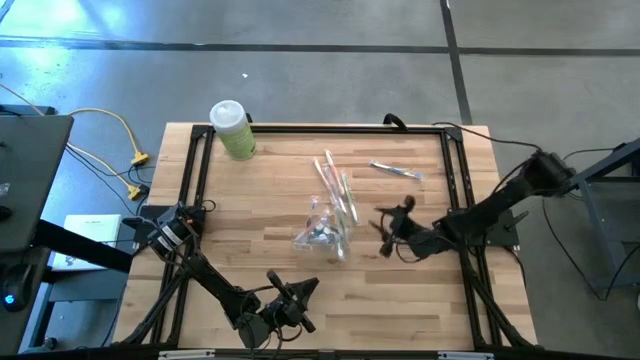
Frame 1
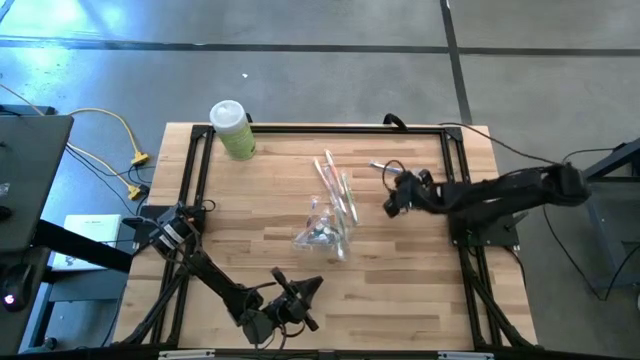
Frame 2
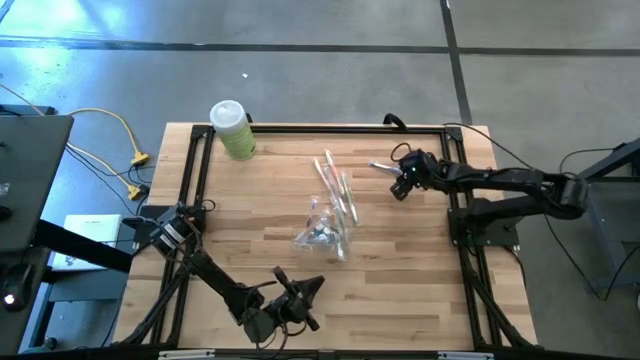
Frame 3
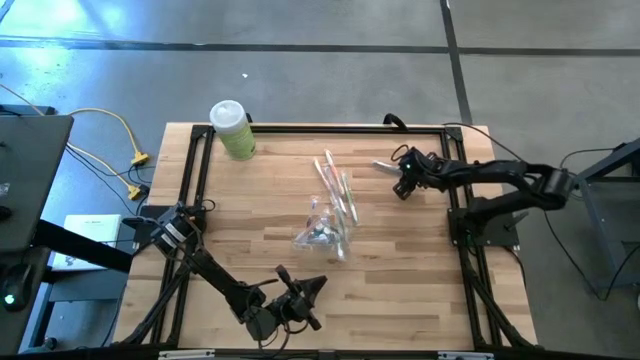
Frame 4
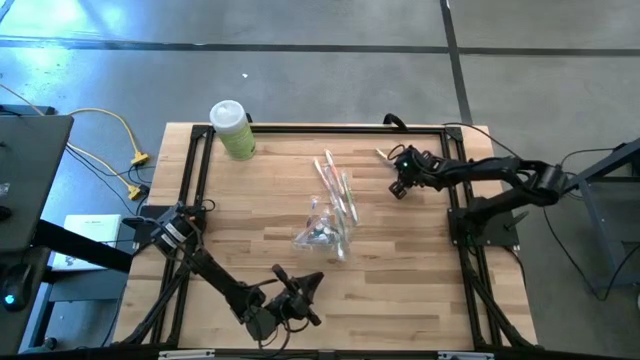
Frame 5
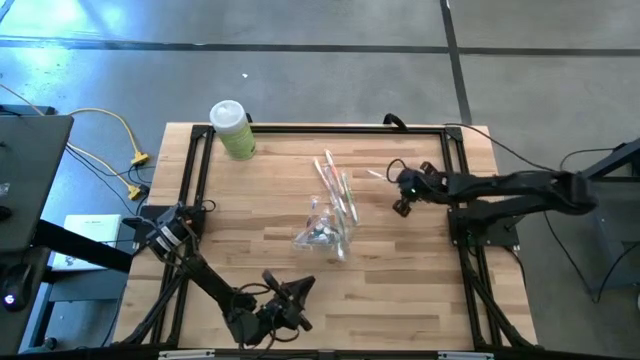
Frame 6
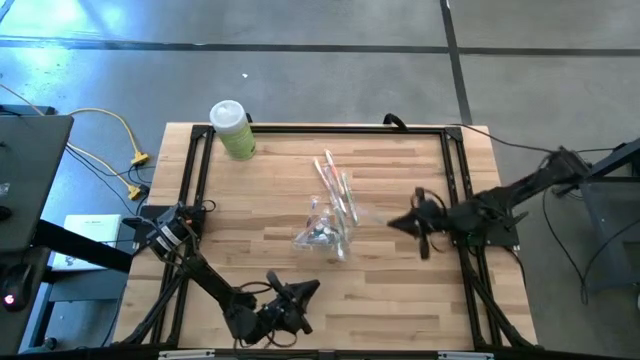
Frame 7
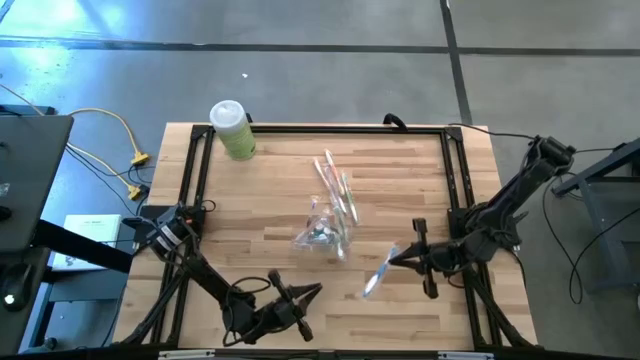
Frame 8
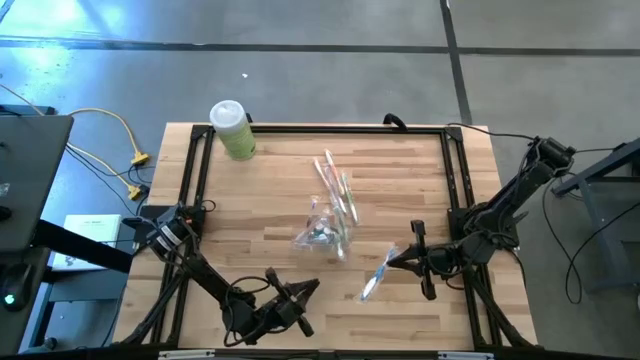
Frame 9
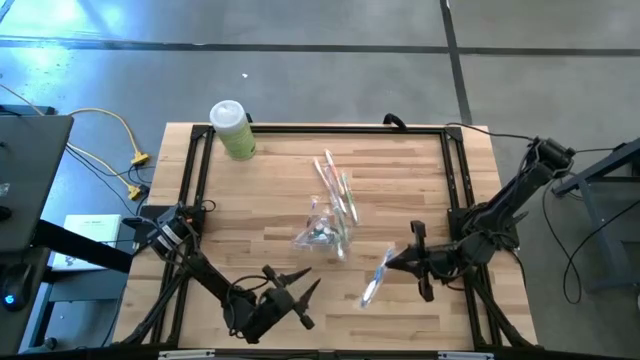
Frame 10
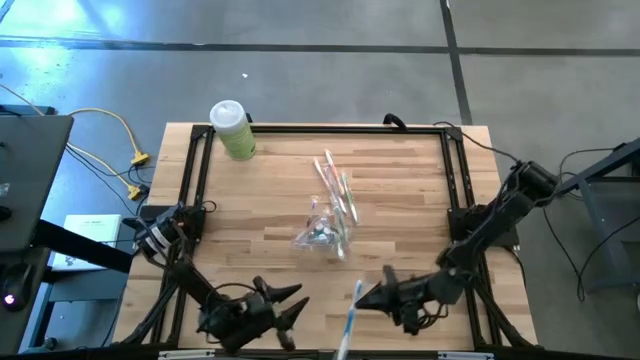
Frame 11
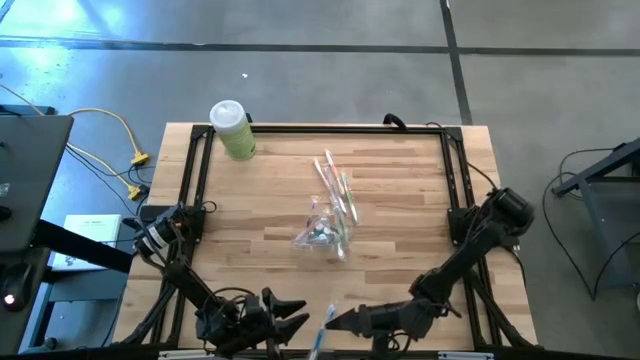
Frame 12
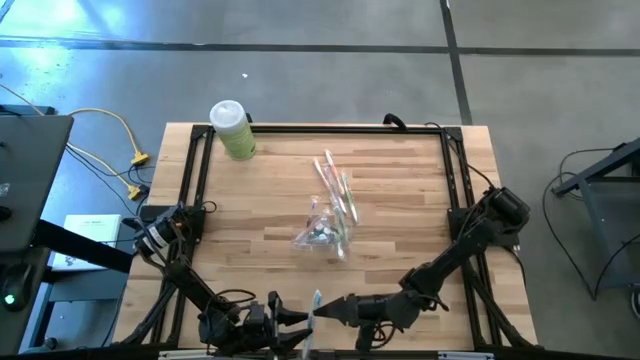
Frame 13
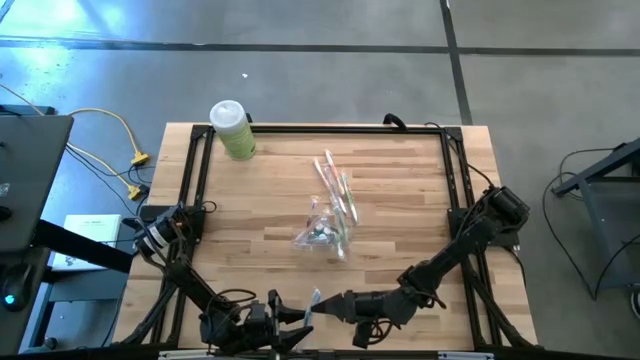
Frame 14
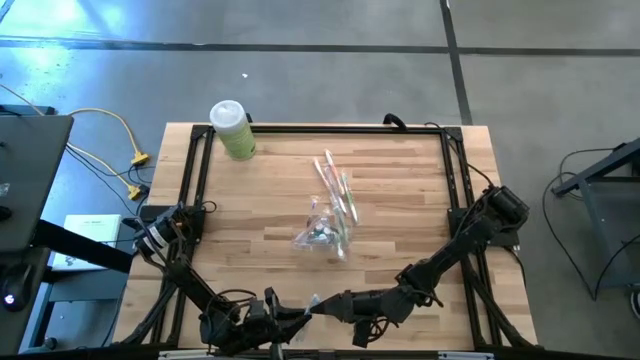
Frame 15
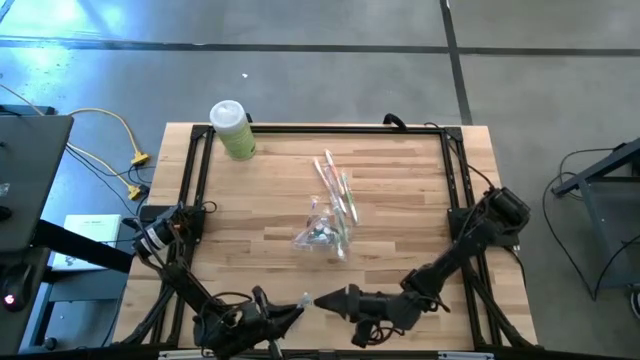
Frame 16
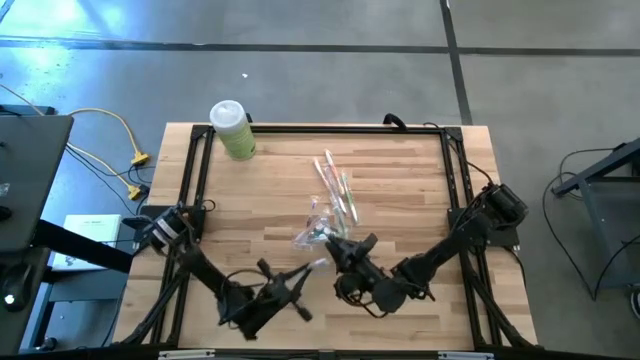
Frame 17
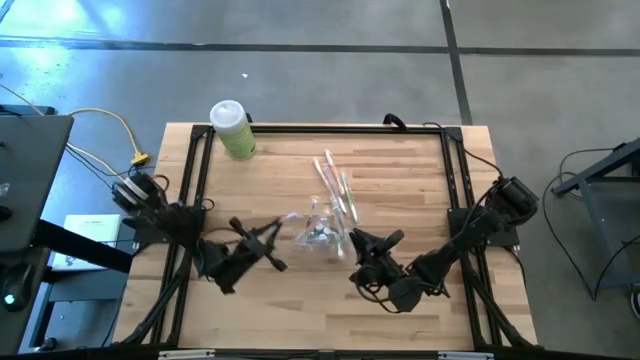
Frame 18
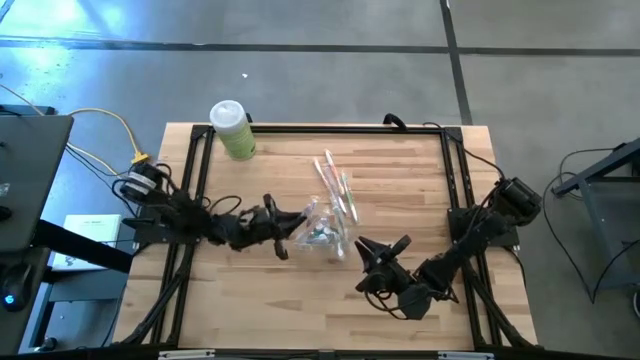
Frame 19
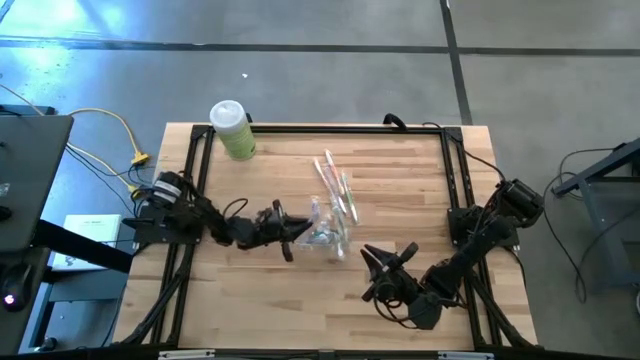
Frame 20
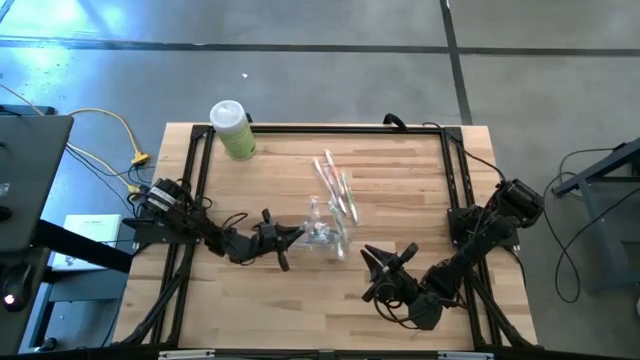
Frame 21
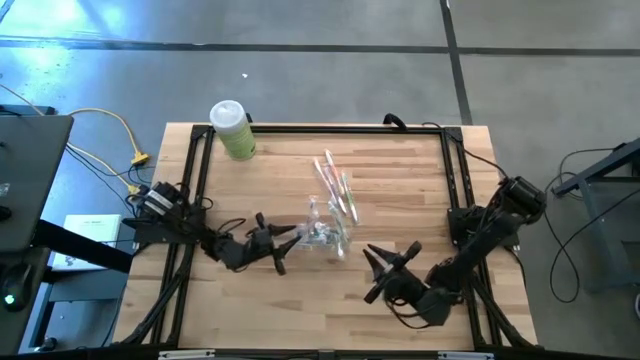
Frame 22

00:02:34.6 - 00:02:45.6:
Task: Pick & Place toothbrushing station
Put the blue toothbrush into the transparent organizer

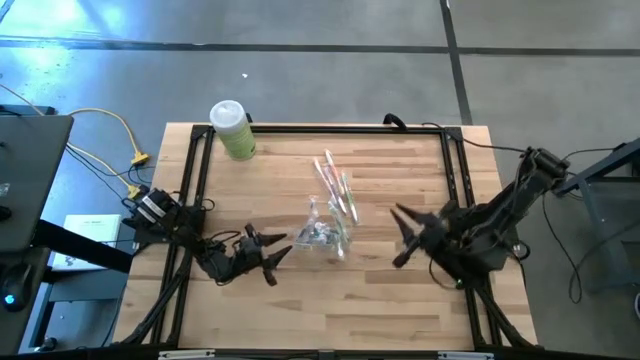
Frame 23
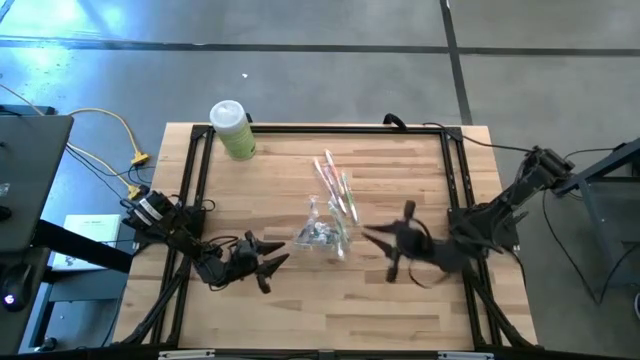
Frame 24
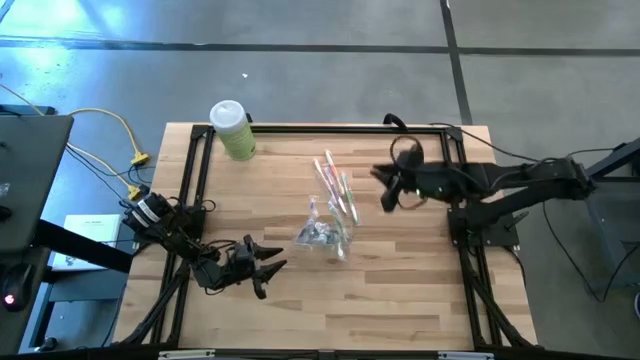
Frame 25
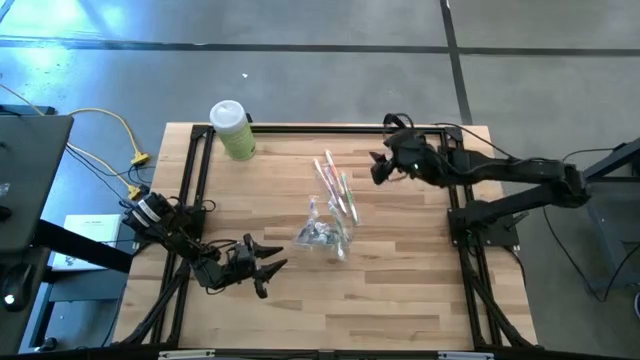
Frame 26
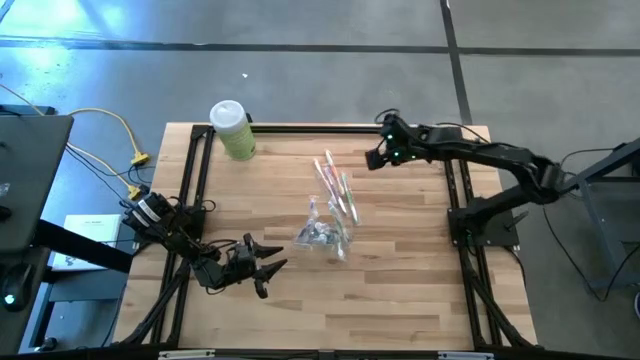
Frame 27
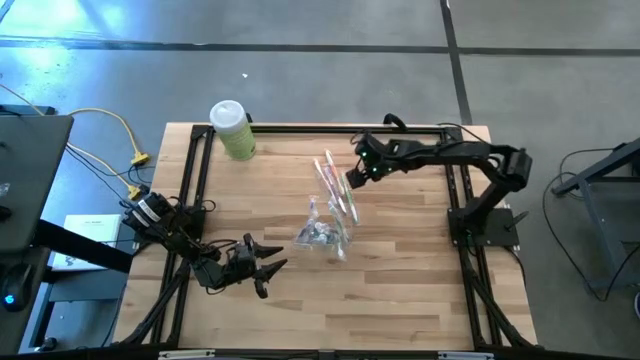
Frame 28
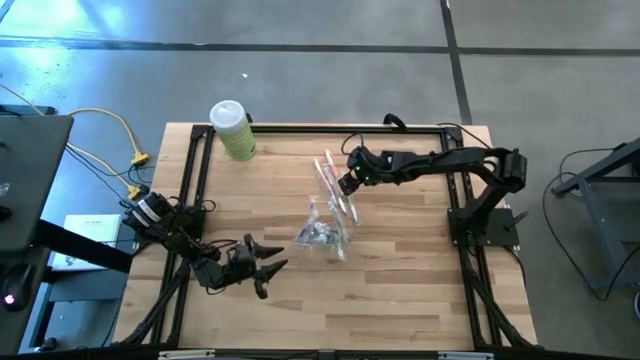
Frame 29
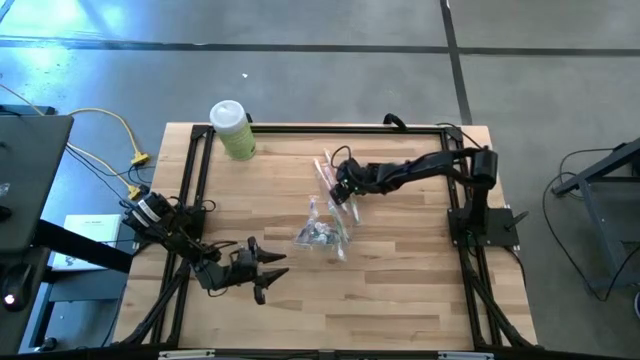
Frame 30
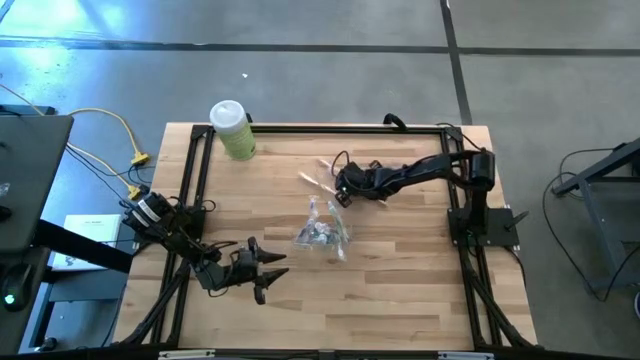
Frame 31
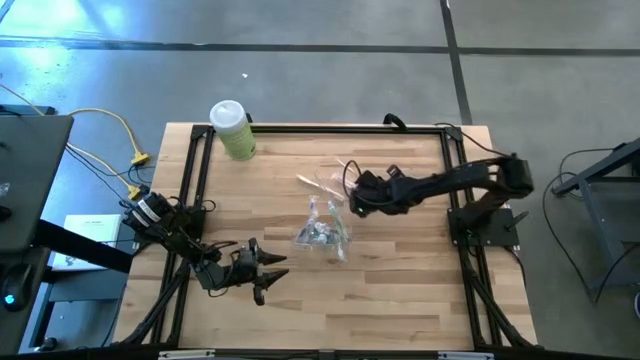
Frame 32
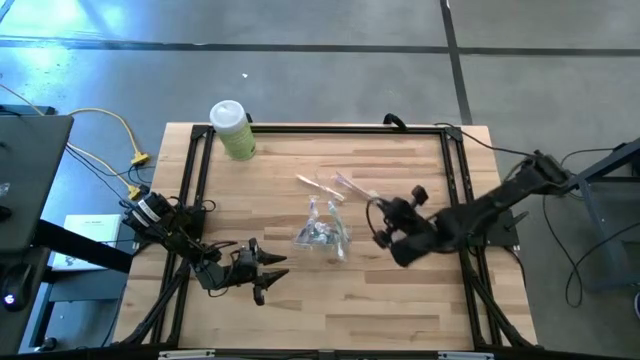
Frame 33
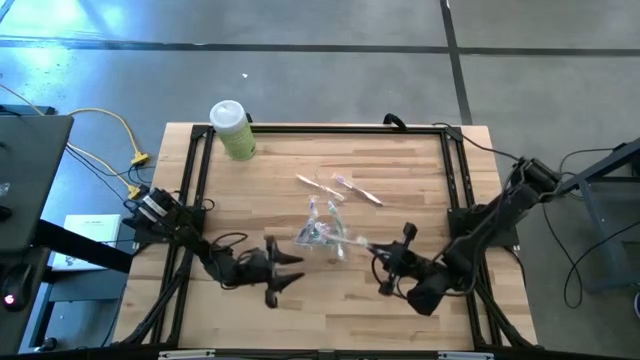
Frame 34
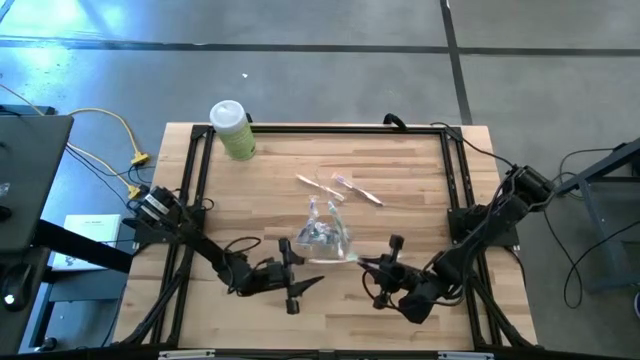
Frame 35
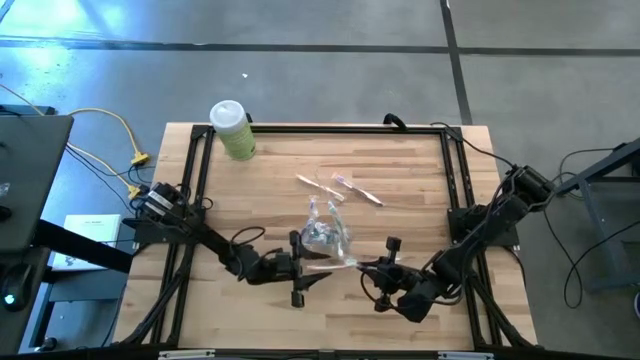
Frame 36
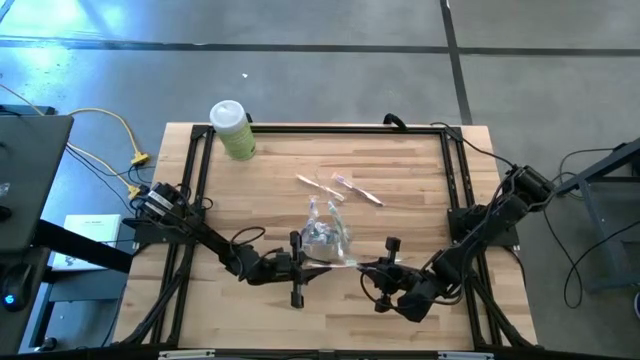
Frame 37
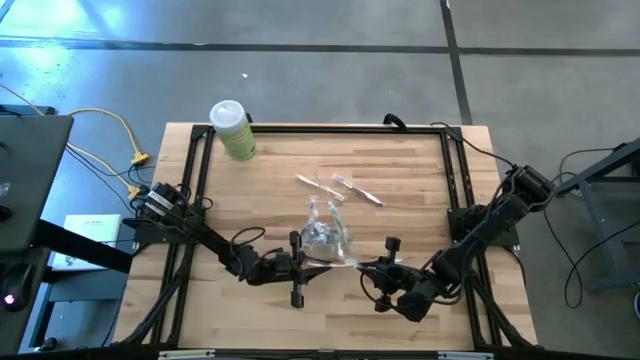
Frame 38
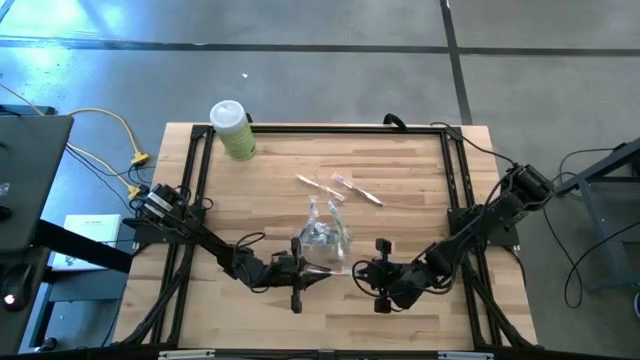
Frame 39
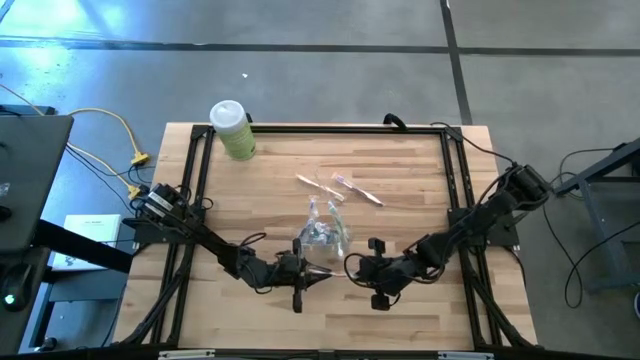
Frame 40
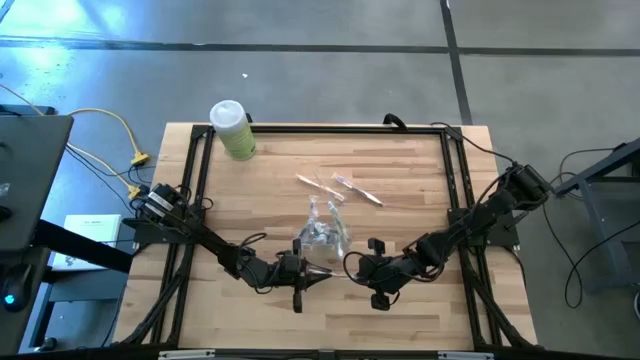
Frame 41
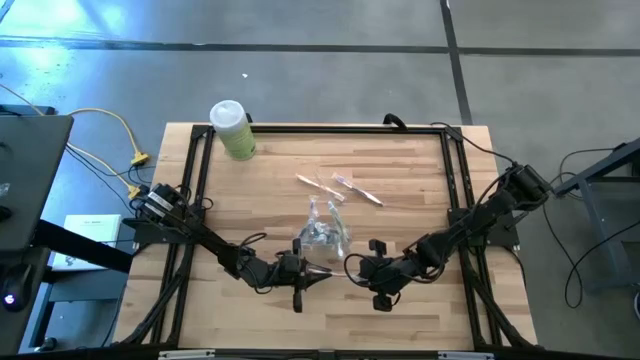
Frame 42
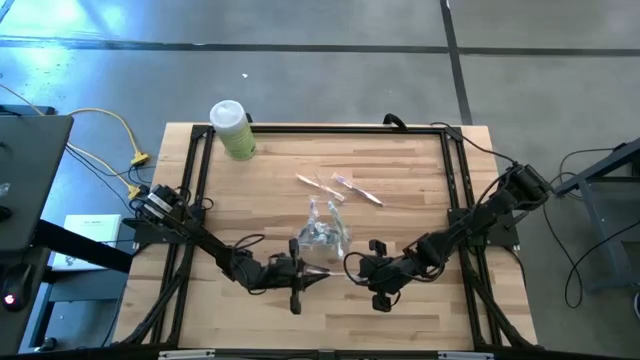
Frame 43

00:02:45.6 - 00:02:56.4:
Put the orange toothbrush into the transparent organizer
